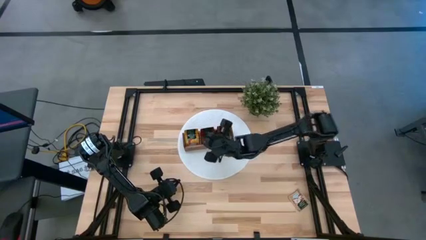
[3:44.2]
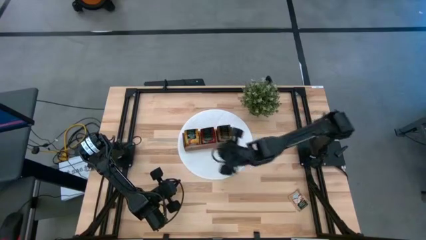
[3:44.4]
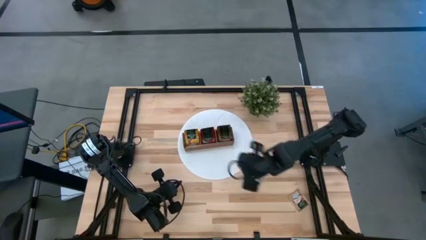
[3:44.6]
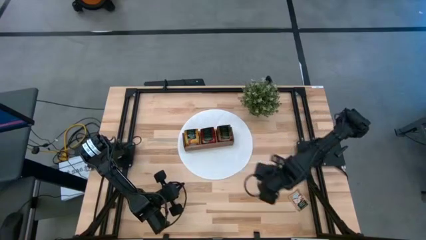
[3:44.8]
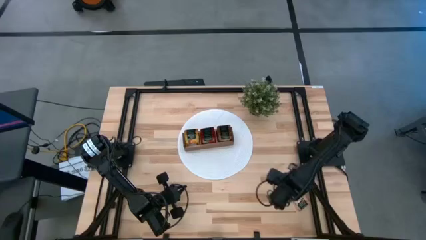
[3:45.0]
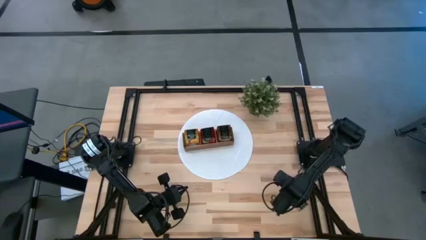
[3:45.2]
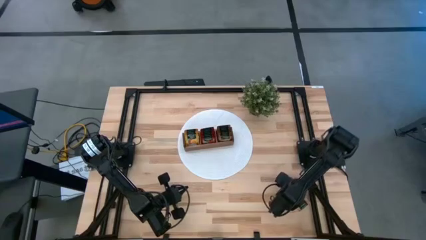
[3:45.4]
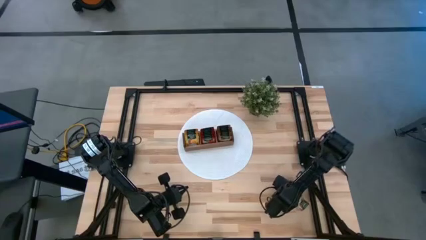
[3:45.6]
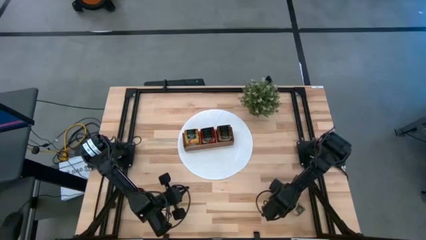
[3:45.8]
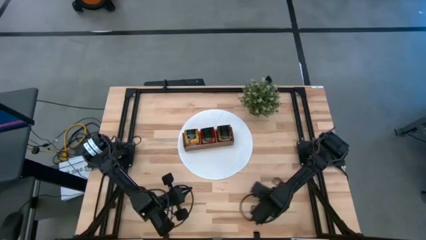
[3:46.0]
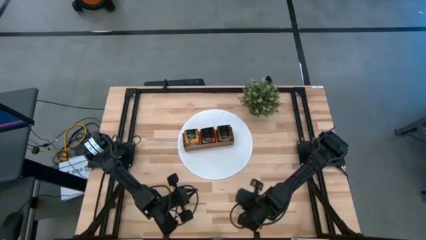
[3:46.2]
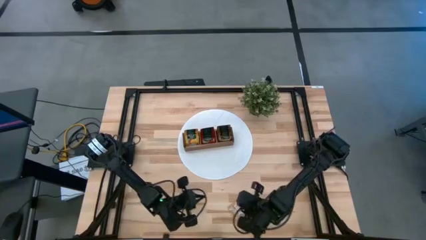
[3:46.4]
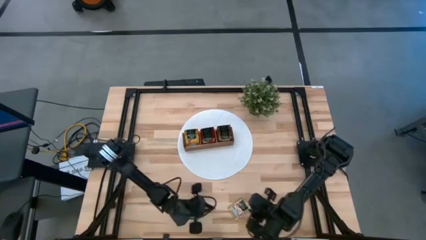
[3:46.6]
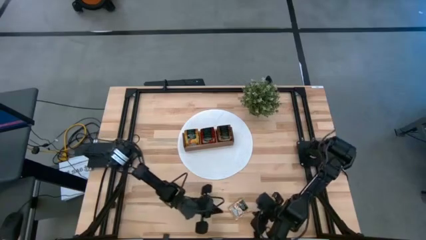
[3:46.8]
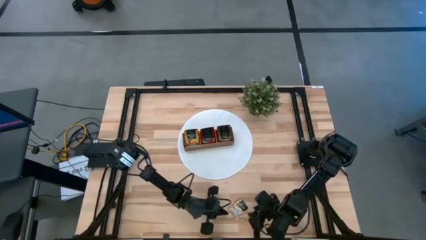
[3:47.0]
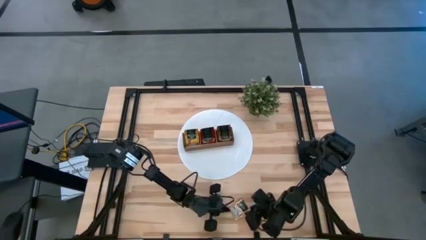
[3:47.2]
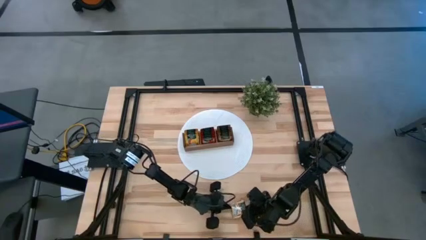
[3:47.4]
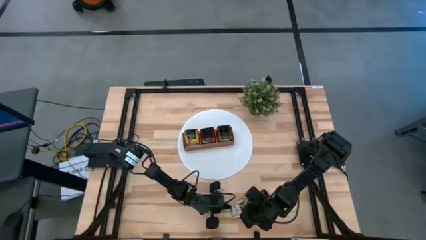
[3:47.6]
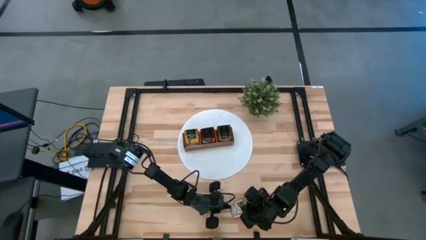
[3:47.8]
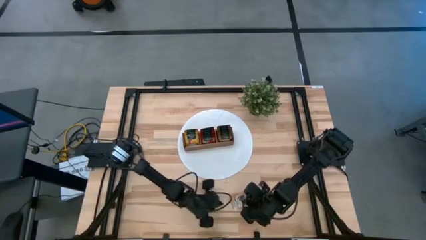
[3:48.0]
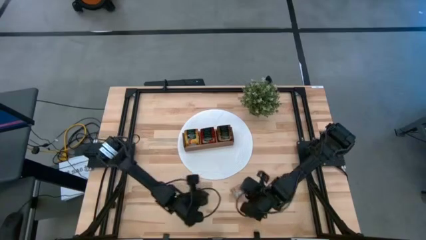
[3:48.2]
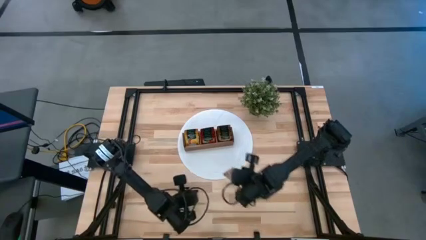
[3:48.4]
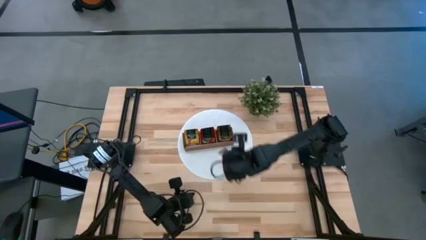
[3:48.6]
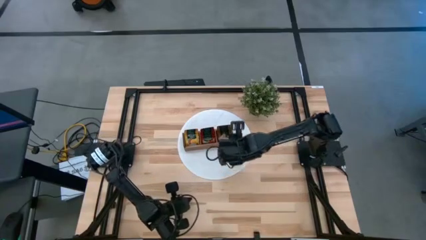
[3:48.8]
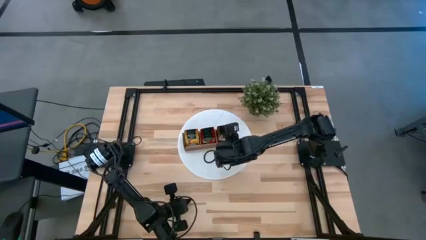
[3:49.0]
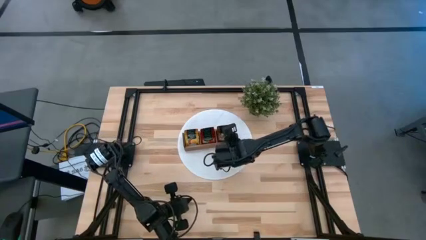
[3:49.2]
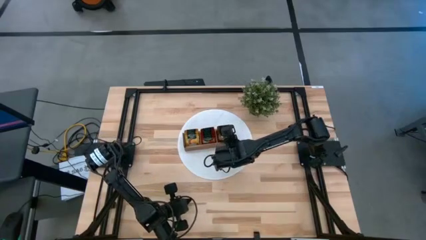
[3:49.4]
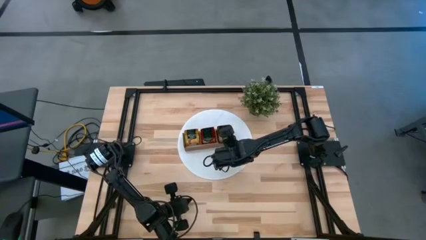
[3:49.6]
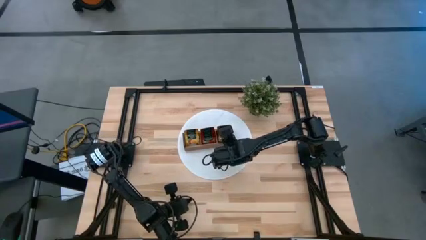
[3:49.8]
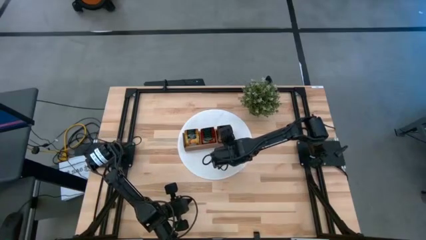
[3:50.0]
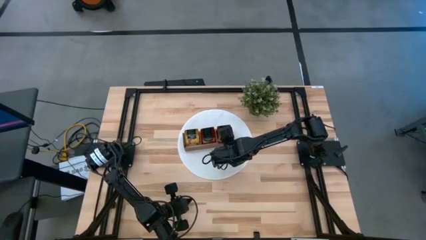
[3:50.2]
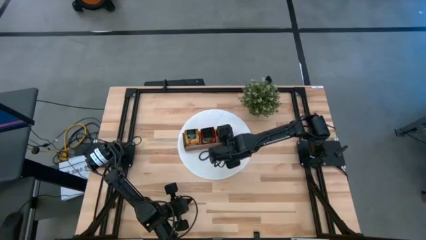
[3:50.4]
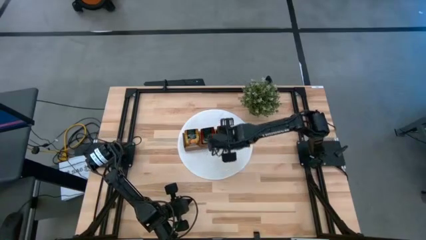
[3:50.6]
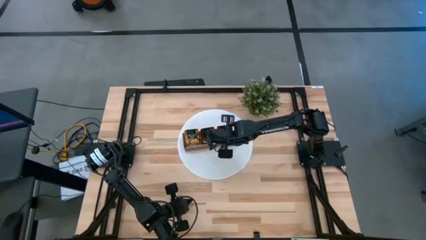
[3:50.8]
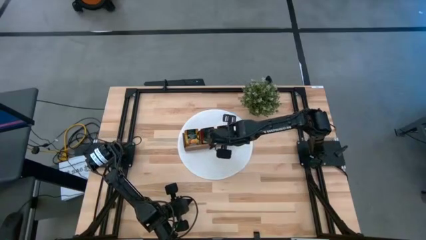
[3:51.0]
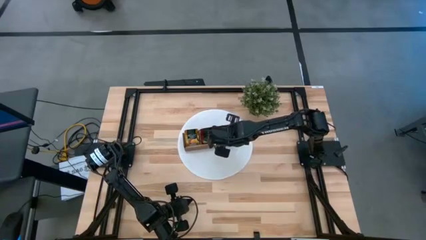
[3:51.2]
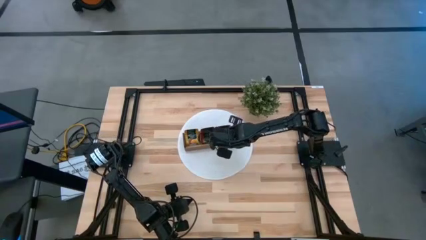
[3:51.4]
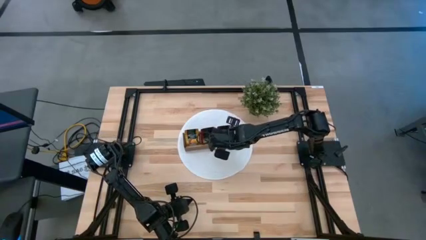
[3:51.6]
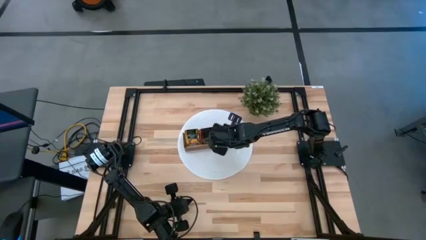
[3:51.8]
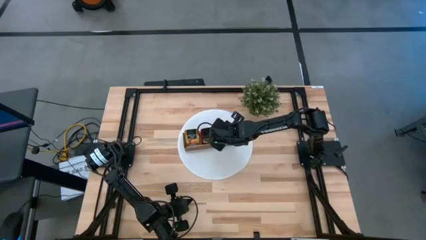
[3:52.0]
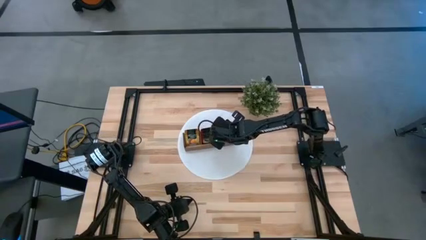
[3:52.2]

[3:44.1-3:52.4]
Task: Pick & Place Tea
Put the brown tea bag into the right section of the wooden organizer

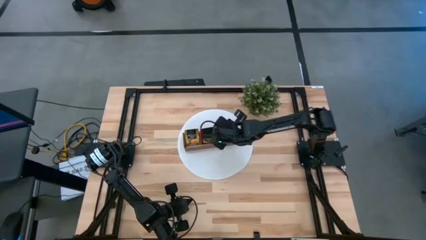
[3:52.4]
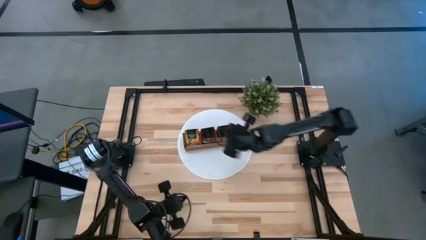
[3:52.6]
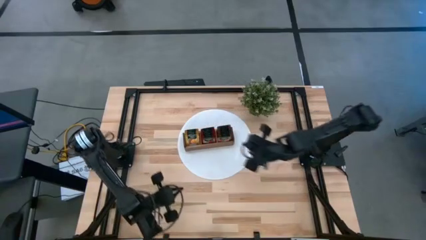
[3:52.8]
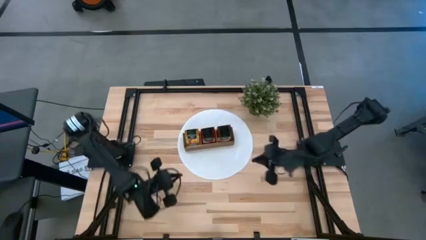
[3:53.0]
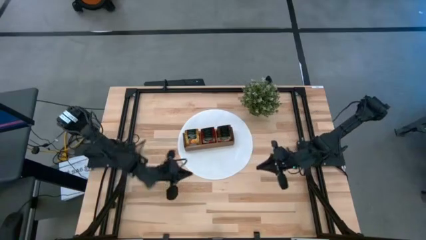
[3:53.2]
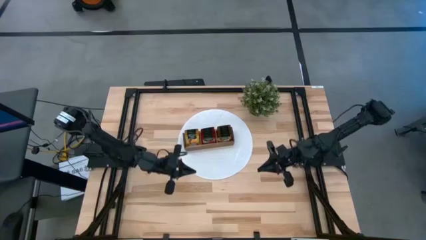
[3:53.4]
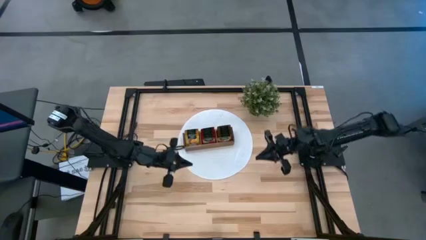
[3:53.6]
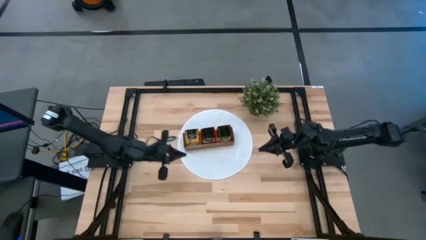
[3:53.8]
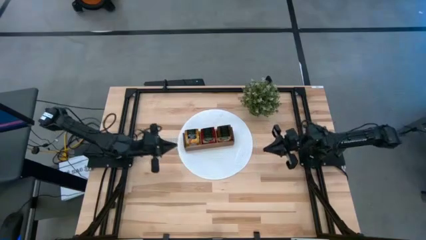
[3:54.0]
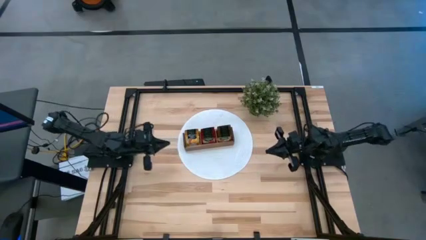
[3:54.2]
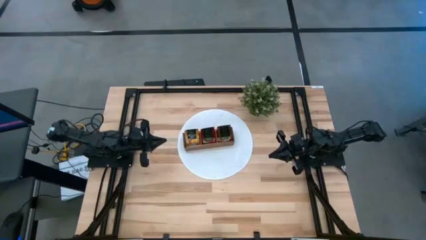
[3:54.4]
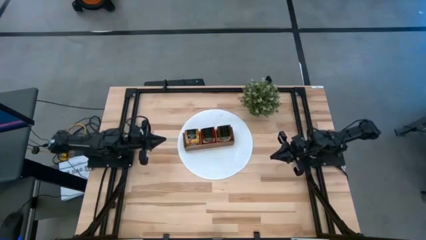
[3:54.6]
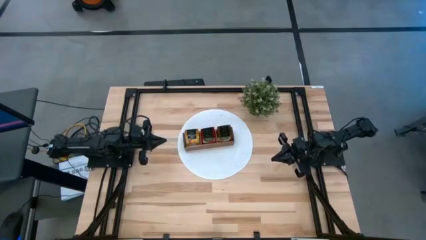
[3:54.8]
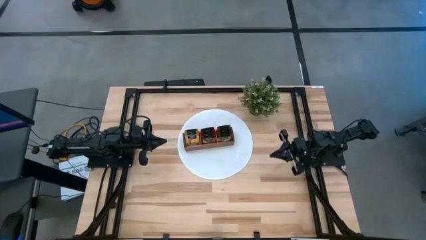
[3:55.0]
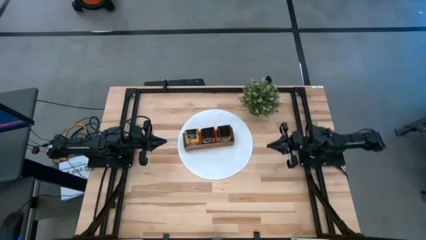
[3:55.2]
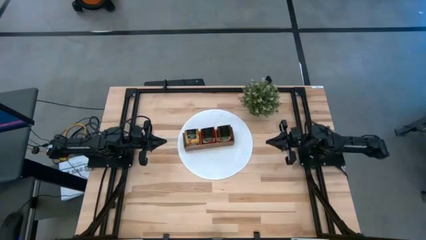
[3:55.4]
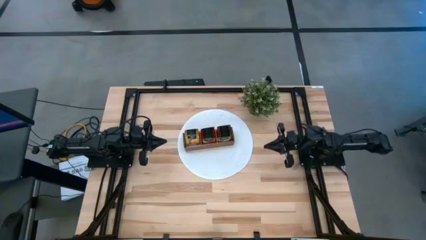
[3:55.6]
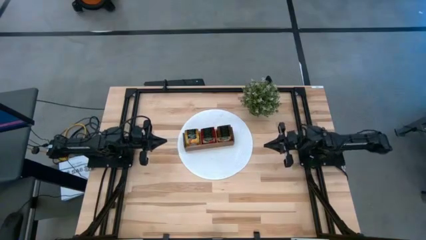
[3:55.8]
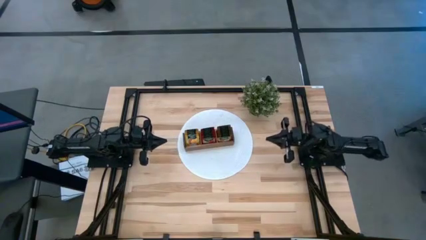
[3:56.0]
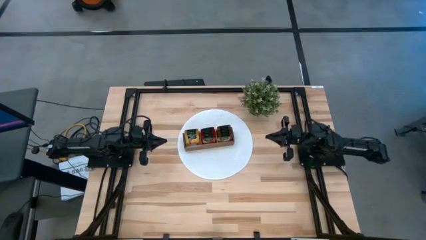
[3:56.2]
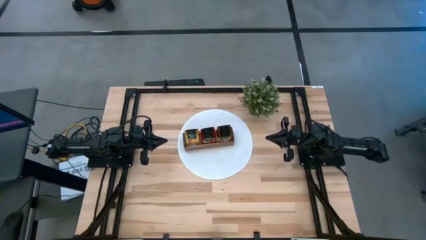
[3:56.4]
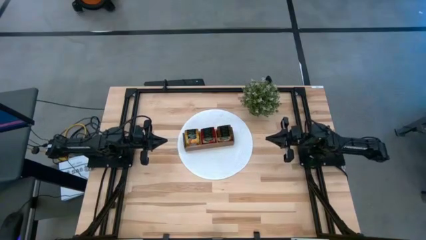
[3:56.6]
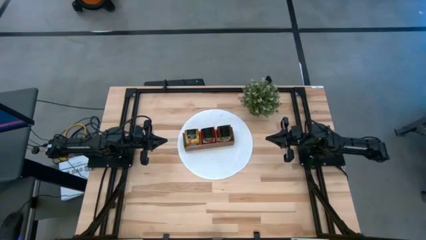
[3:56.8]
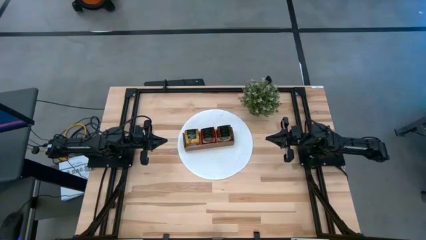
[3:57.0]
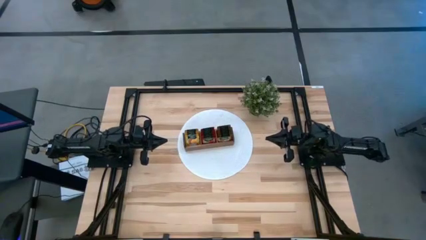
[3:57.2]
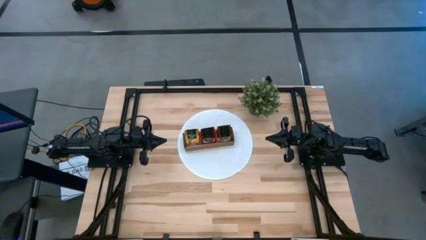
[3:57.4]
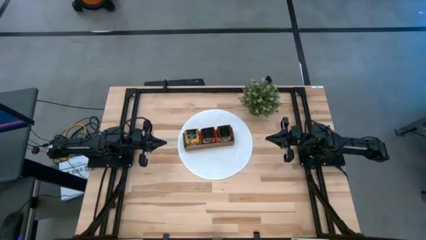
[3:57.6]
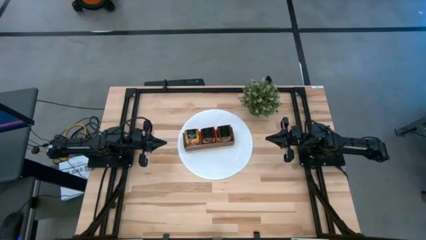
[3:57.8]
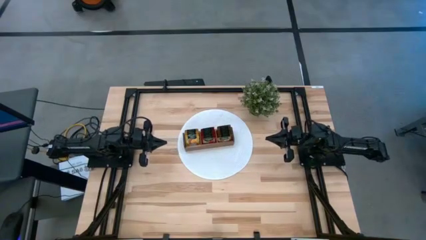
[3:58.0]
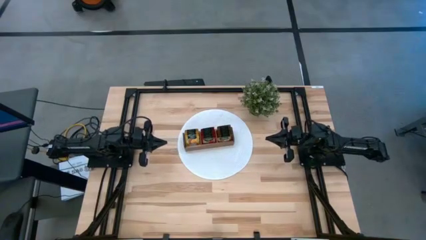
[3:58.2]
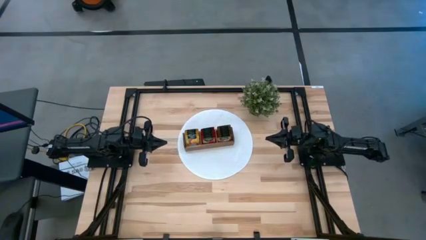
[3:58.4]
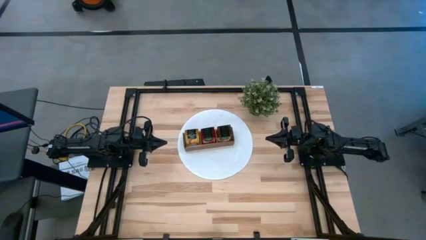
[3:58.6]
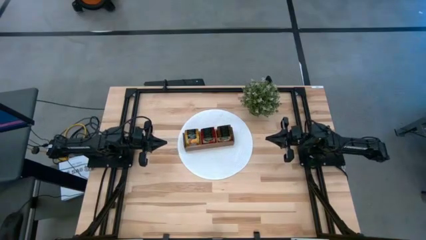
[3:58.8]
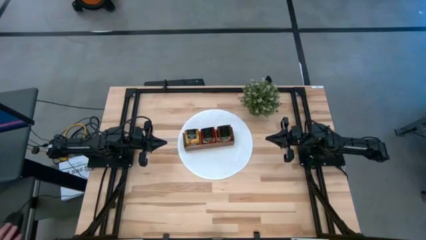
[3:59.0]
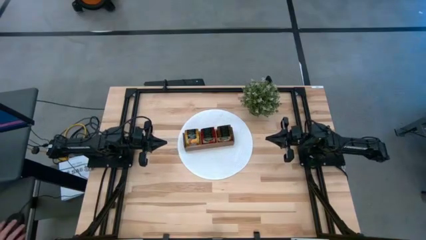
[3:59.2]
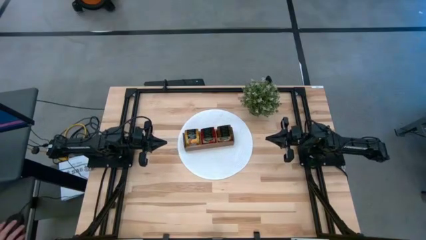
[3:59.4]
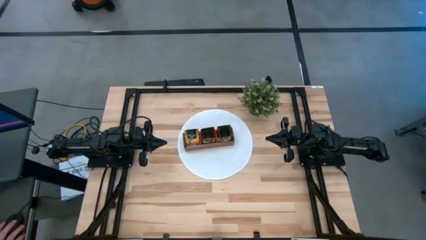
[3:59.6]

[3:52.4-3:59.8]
Return to Home Position
